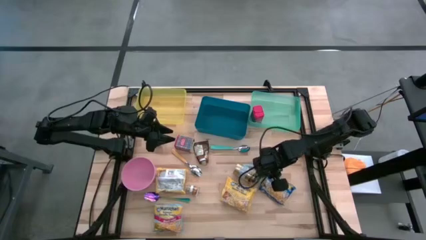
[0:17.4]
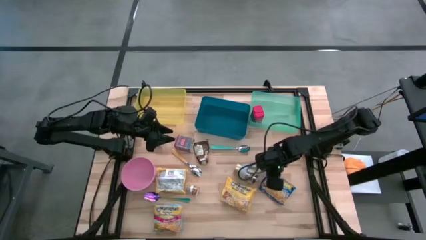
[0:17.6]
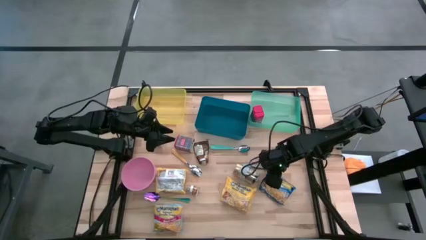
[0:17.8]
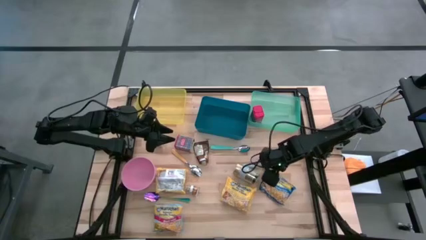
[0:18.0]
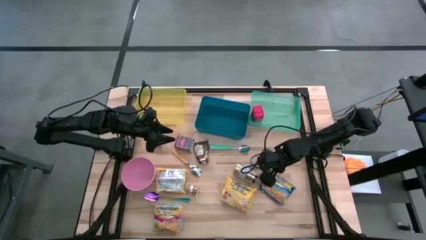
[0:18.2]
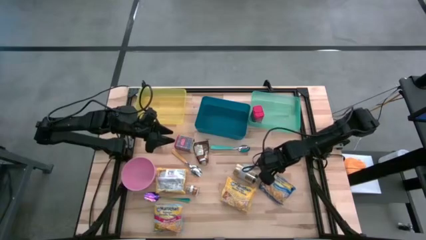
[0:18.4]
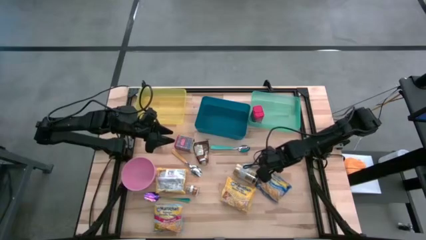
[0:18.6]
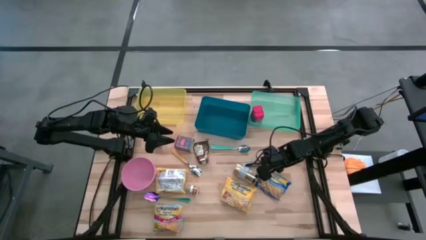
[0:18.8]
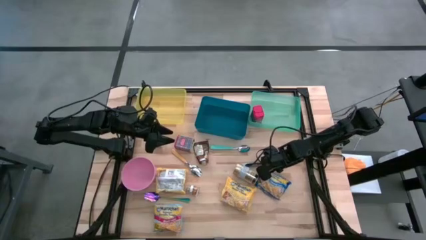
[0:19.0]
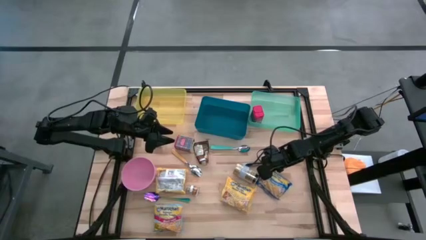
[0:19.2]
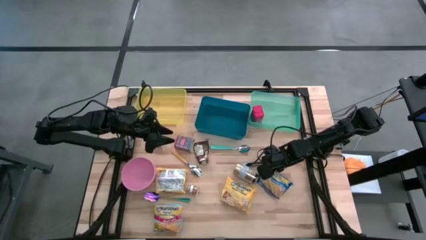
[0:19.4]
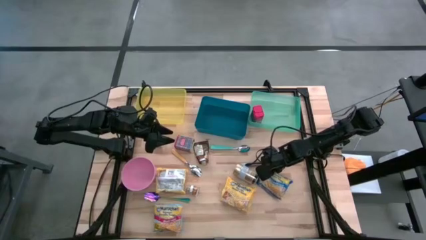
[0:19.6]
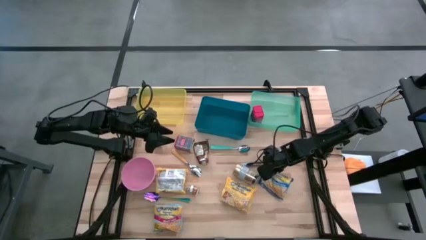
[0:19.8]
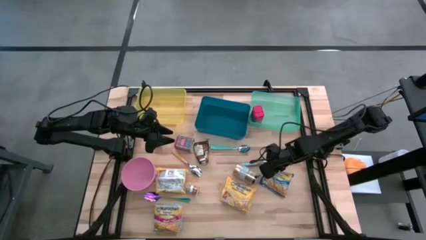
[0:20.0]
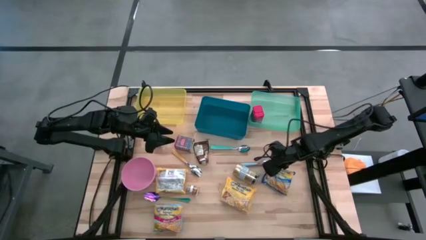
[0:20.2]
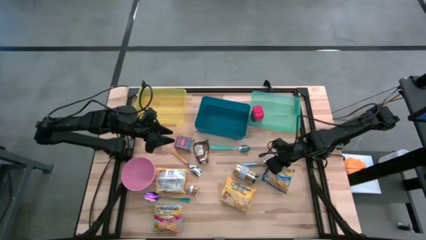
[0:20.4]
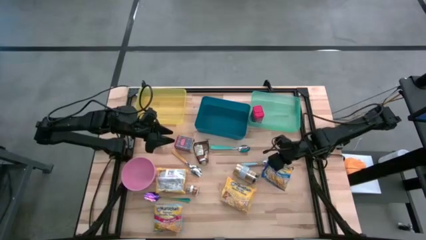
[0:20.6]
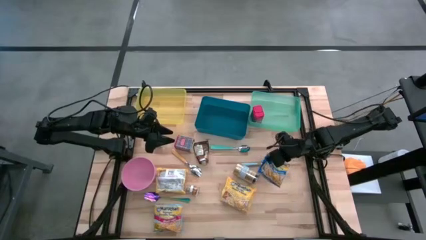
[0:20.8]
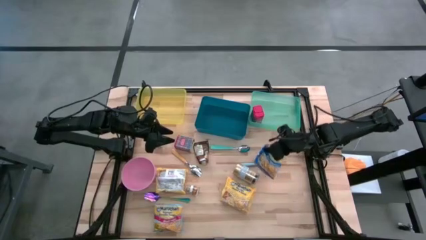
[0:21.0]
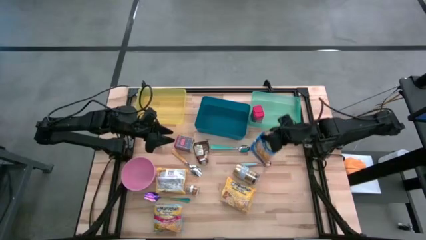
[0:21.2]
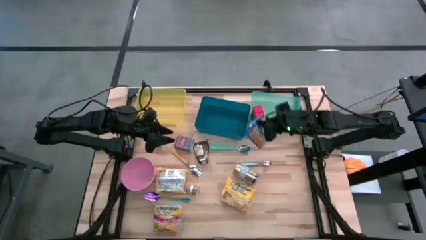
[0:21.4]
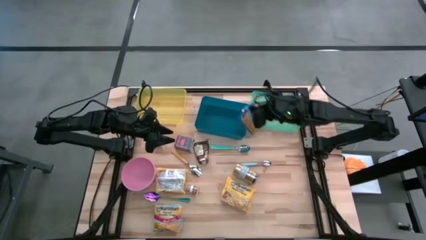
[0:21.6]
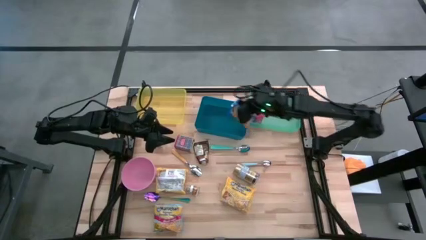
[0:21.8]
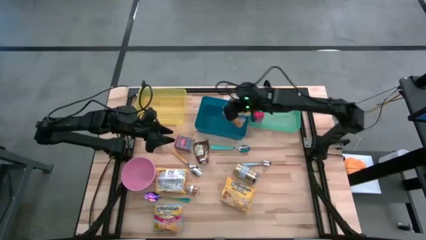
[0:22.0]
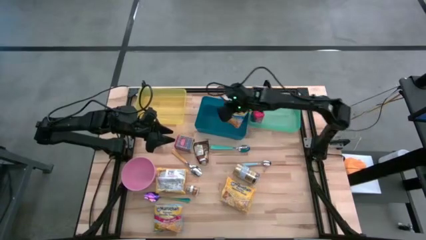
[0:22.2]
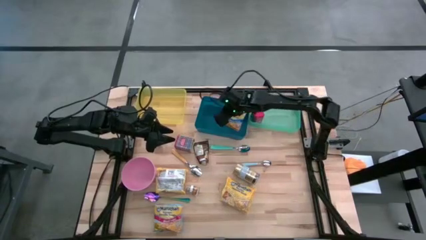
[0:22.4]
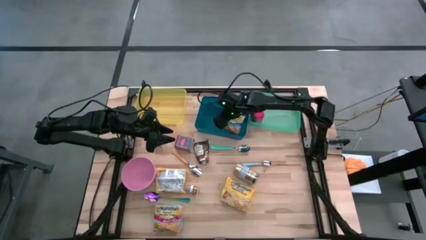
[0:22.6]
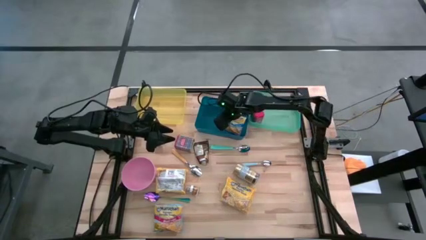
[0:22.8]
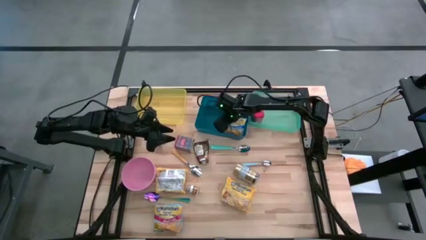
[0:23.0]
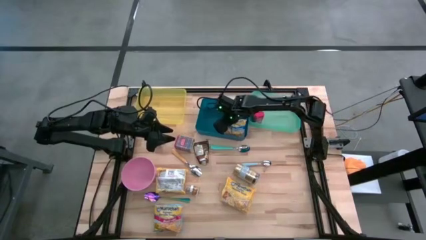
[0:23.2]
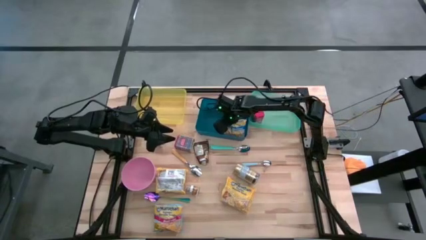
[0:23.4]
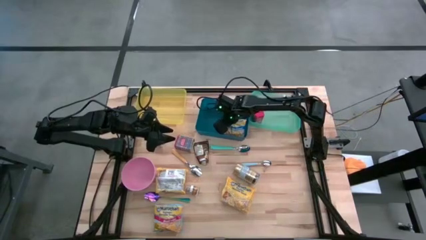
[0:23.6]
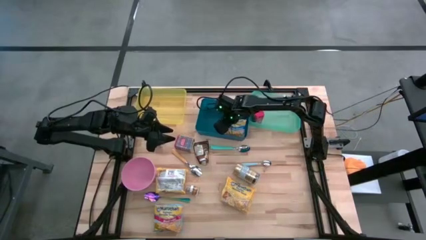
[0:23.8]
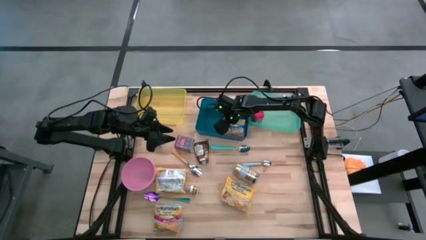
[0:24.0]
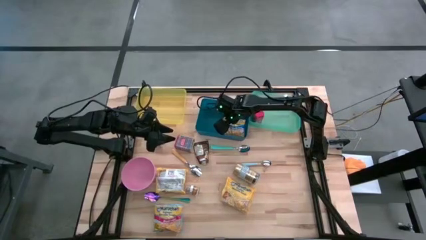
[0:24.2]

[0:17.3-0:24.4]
Put the blue noodle pack into the blue bin

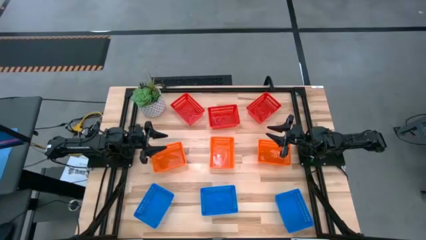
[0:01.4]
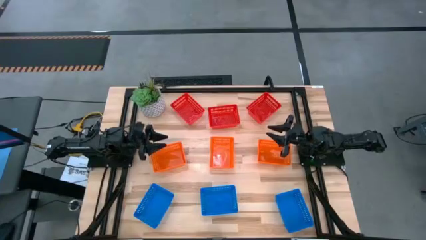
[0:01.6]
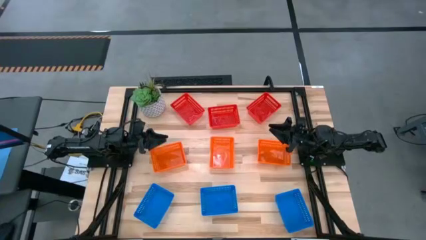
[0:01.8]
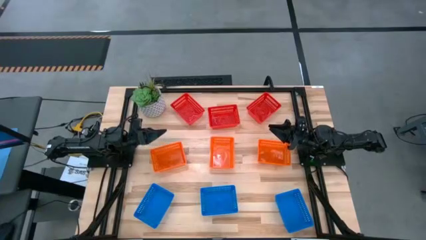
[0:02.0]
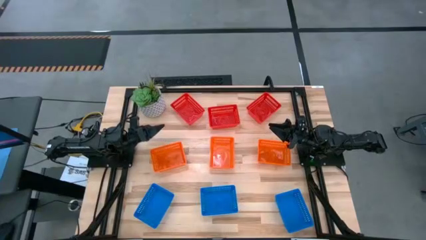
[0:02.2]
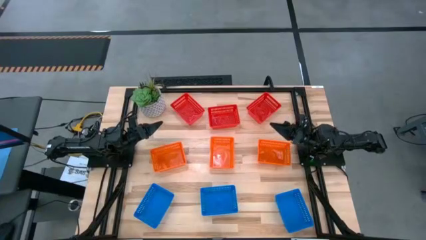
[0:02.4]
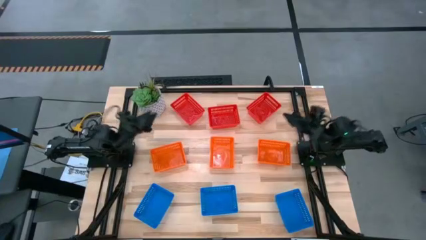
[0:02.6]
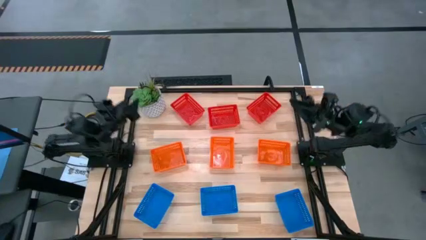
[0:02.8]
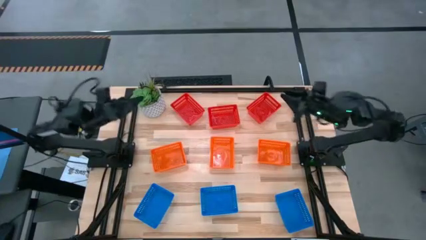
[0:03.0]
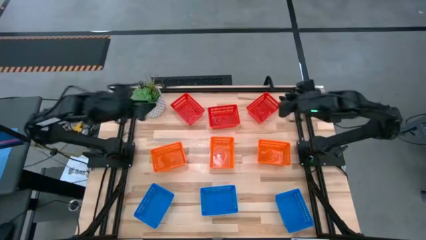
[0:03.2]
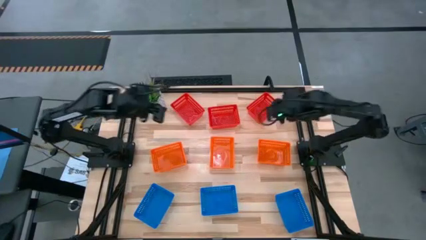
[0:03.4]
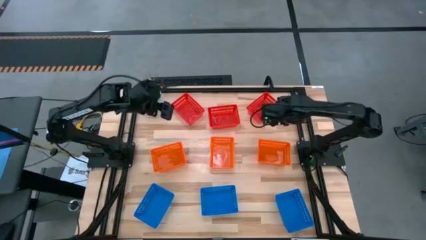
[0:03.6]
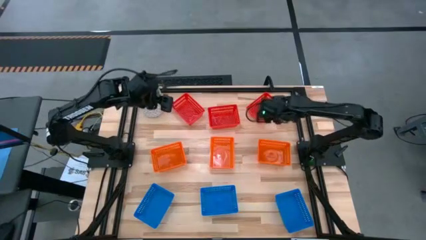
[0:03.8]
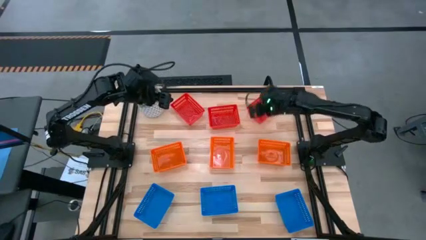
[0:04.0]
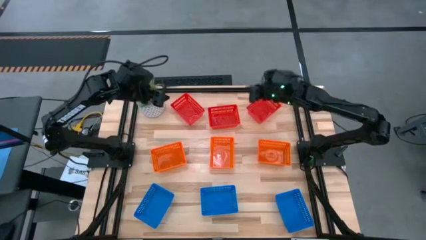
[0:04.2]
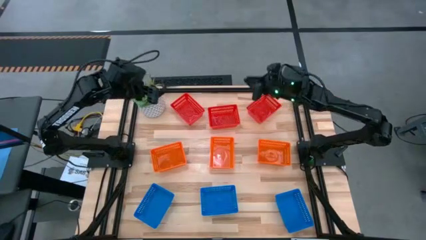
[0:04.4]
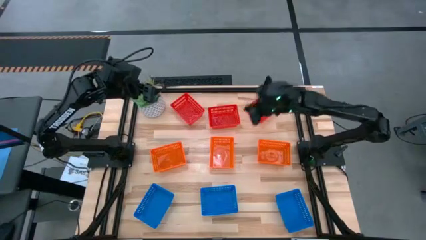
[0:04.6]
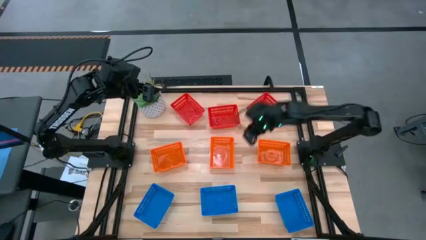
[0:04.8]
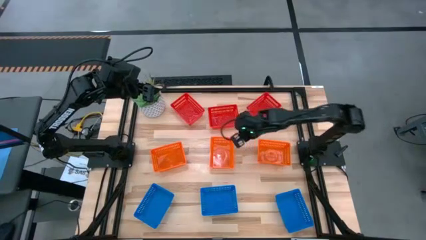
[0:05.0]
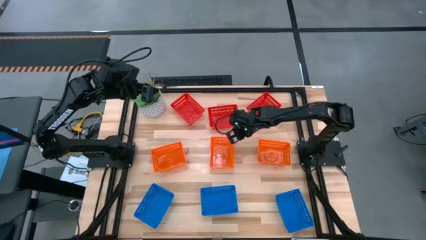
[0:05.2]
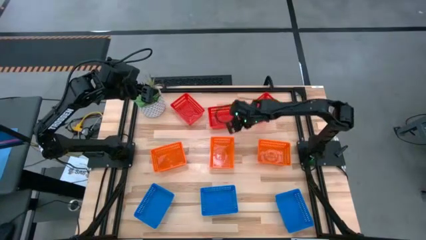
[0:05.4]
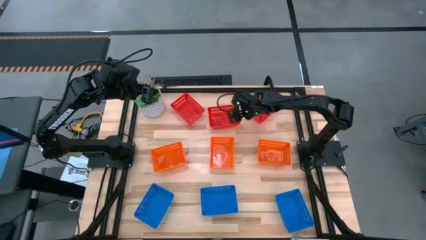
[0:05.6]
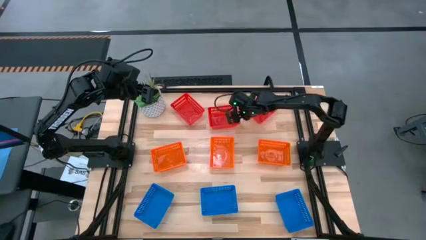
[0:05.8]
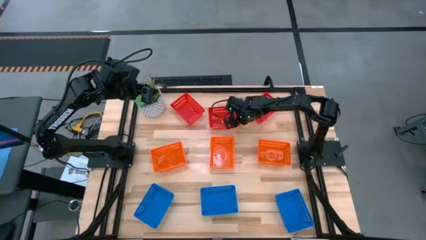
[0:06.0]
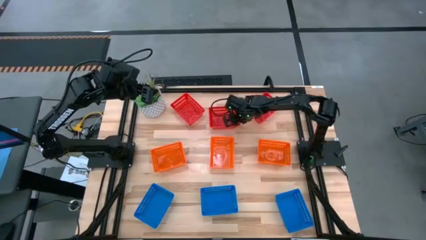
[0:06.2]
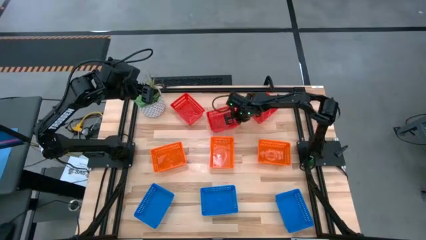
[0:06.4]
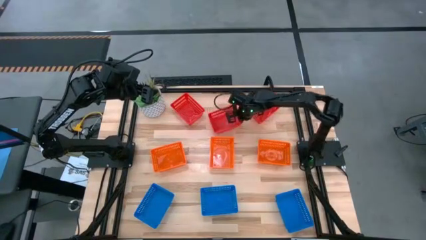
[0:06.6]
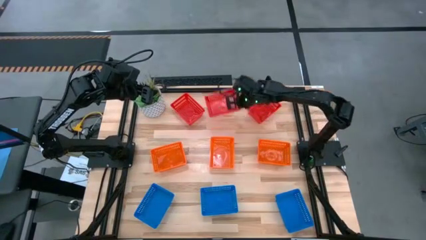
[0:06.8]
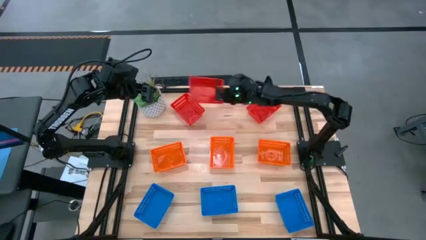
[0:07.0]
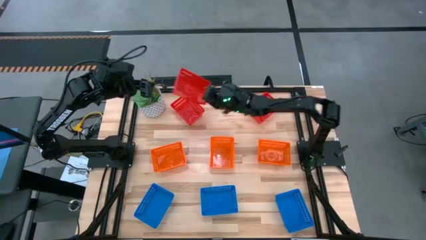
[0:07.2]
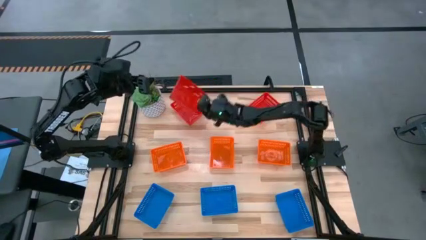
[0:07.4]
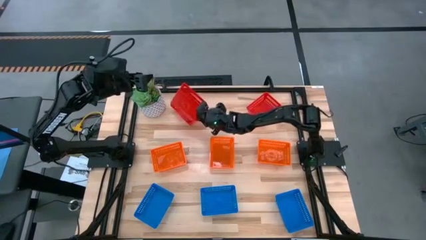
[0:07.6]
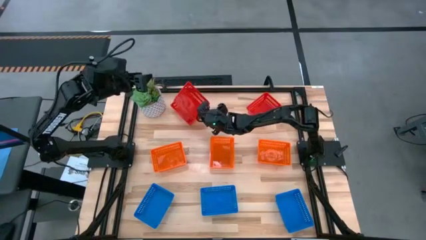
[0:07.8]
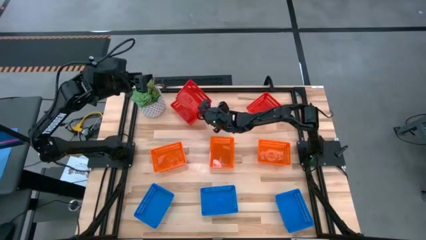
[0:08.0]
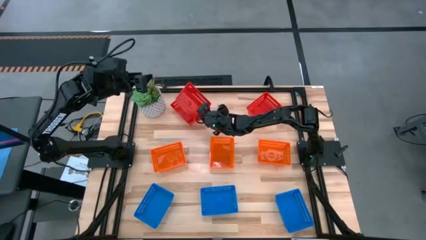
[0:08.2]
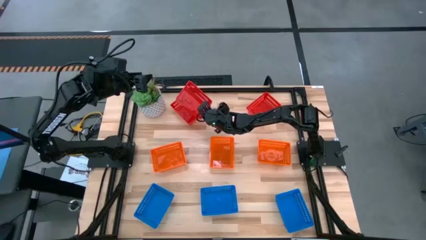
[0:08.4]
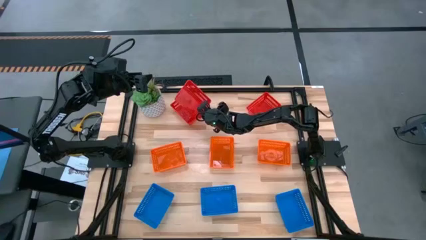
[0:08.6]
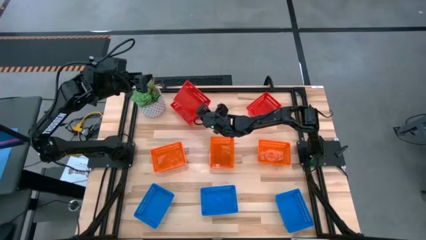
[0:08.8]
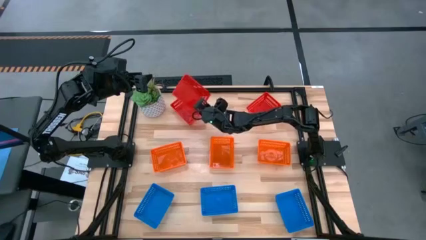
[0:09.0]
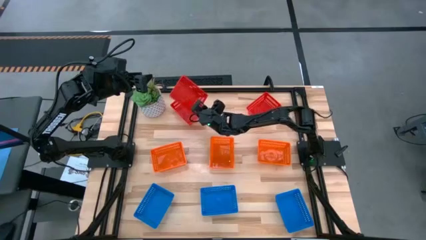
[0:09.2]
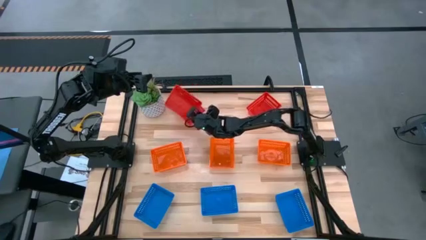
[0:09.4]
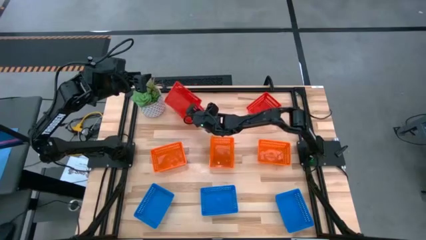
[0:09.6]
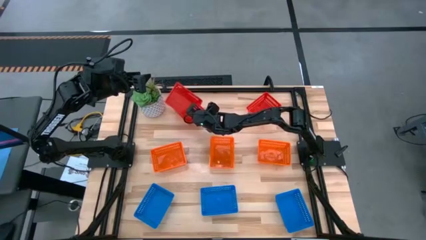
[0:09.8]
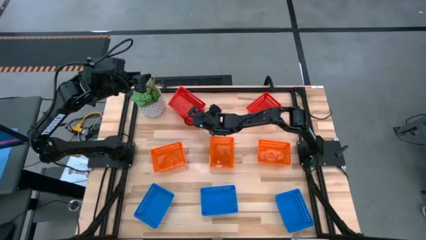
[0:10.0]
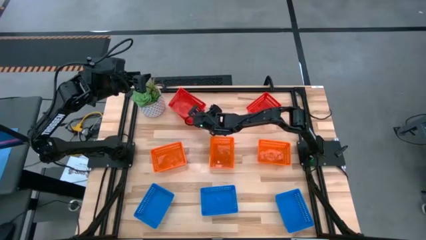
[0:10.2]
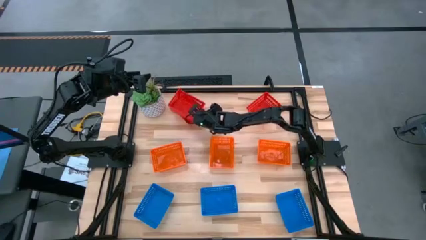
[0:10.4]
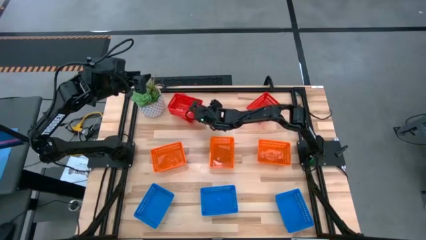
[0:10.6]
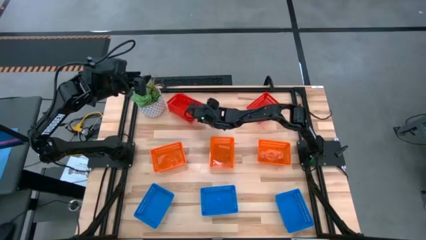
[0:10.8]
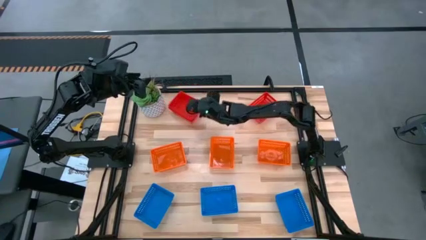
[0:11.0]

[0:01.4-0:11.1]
Stack the middle red bin on top of the left red bin
